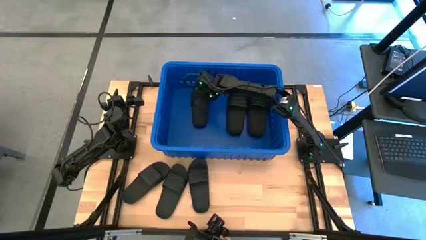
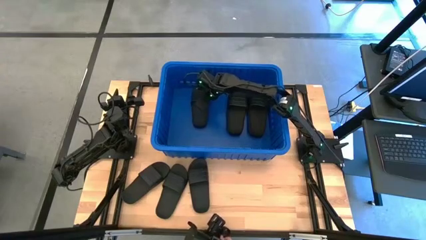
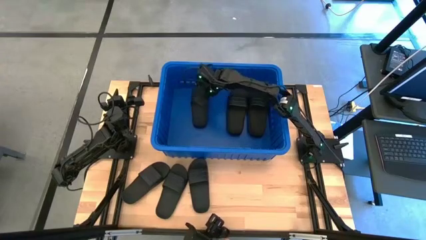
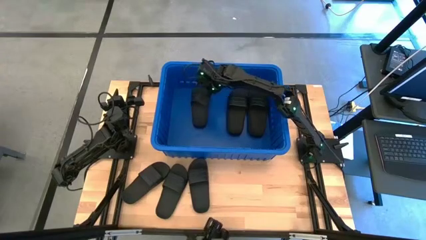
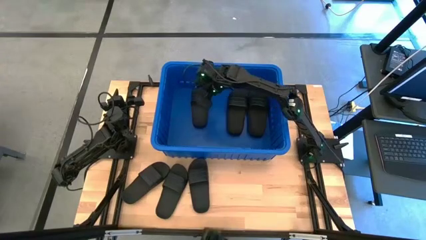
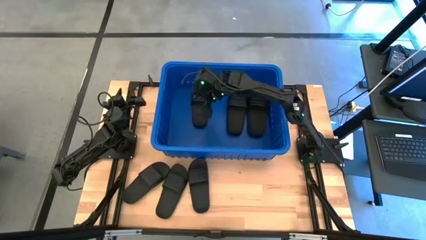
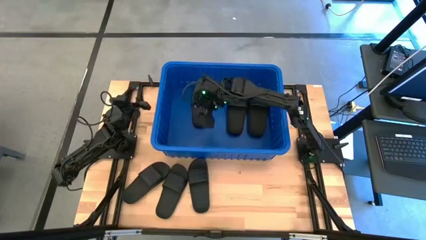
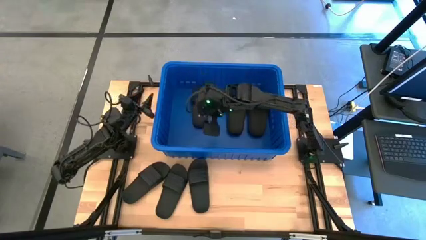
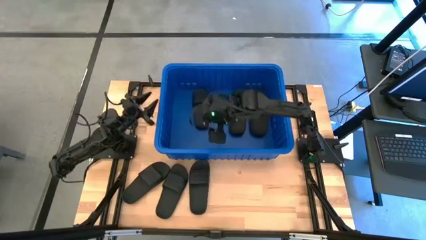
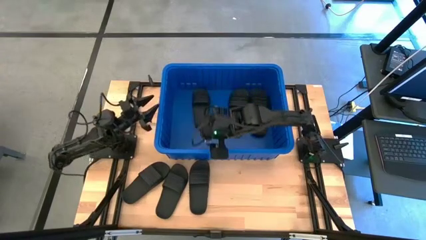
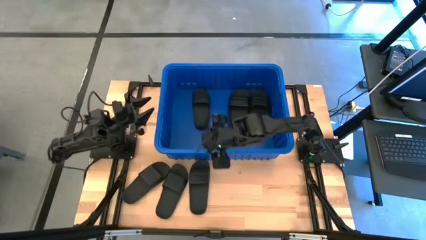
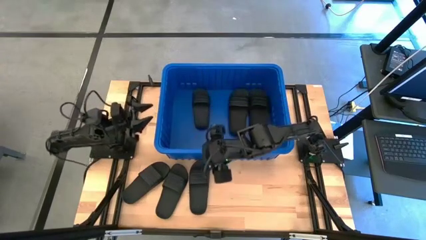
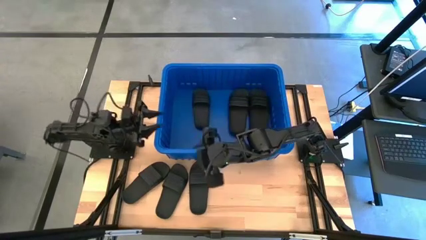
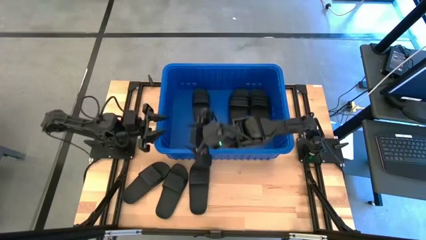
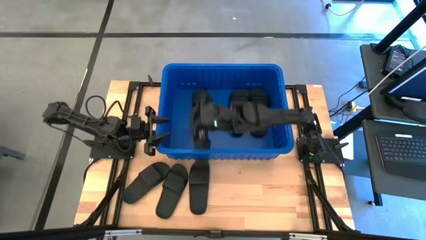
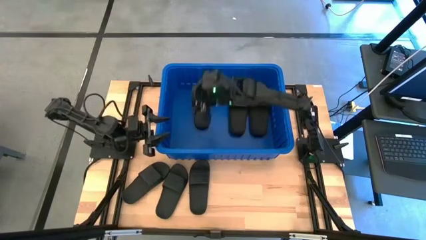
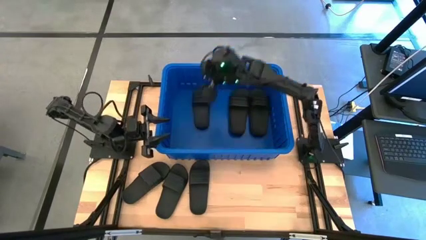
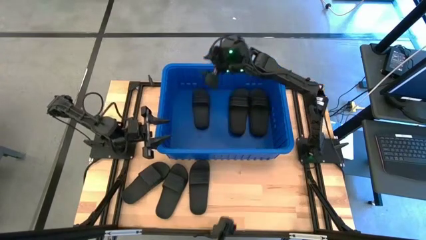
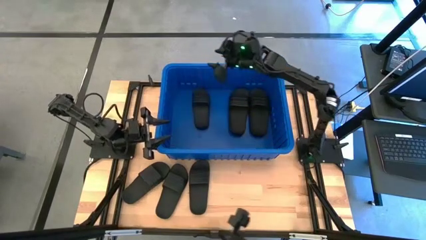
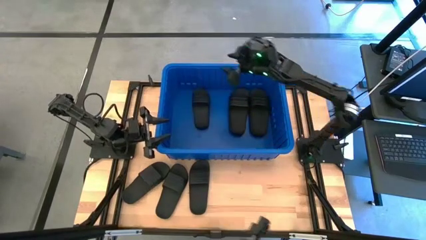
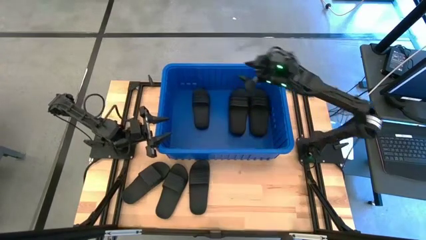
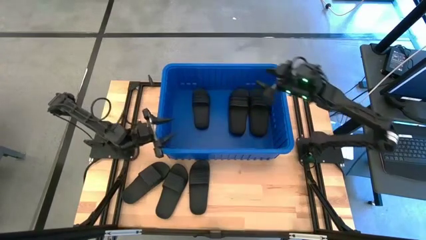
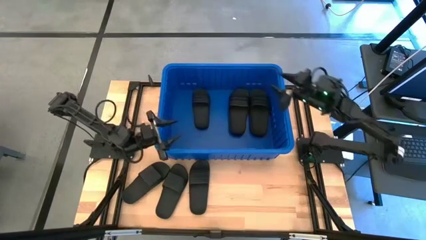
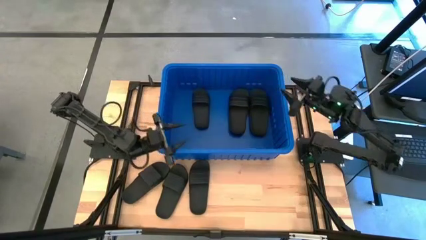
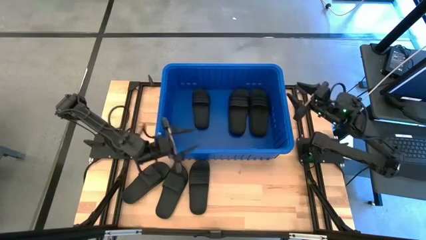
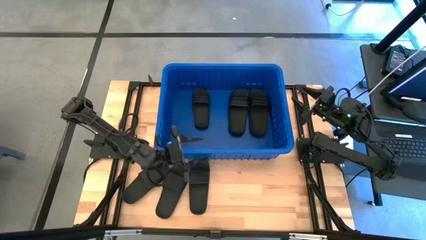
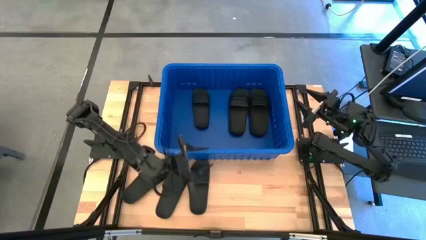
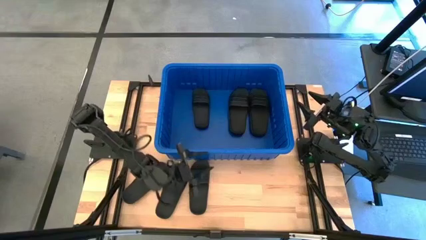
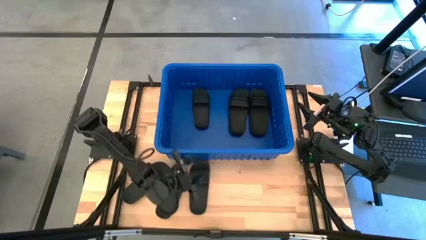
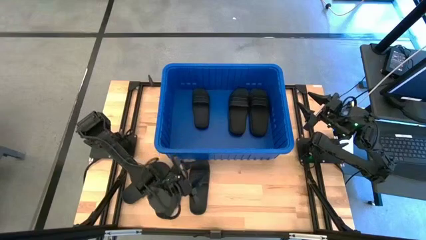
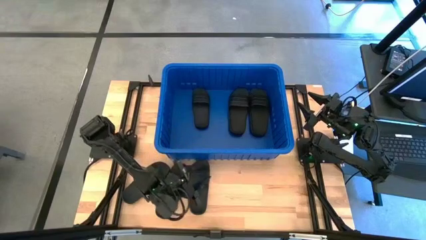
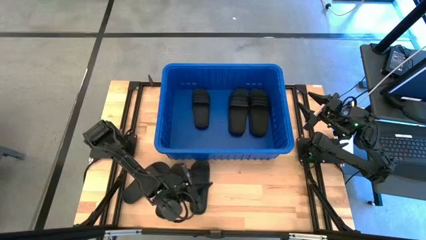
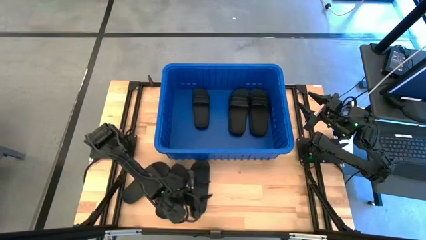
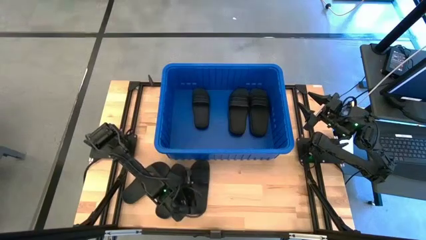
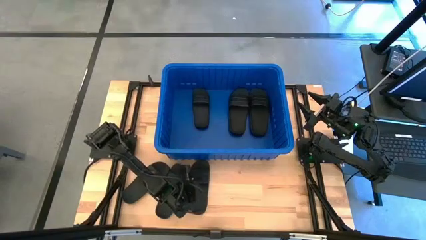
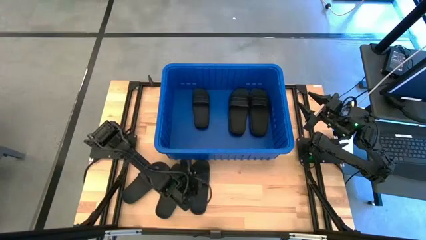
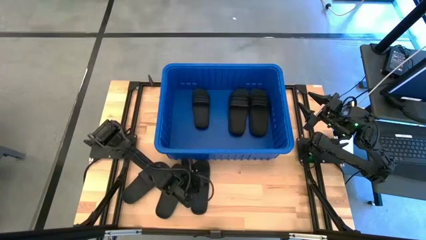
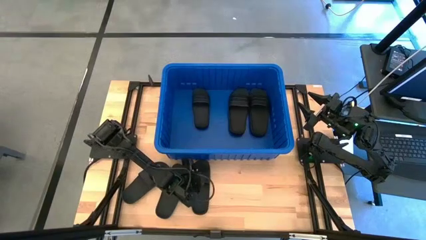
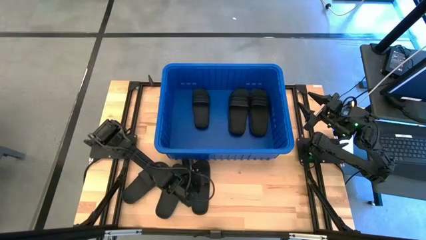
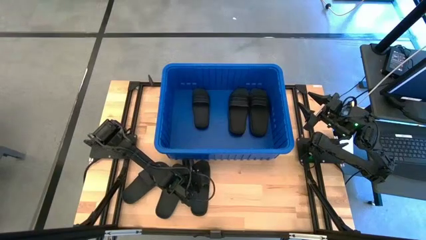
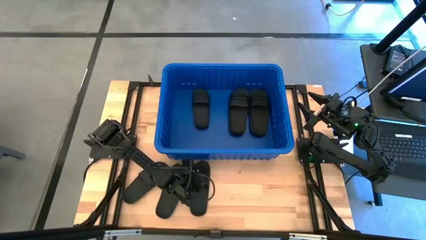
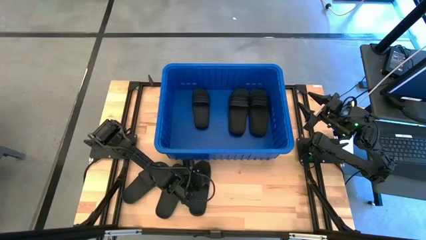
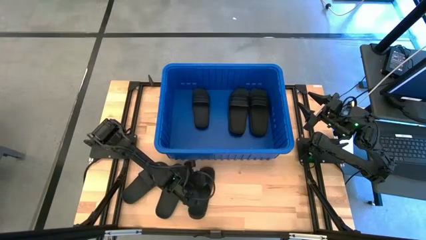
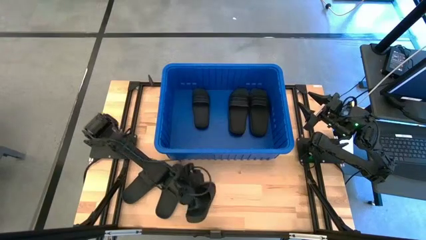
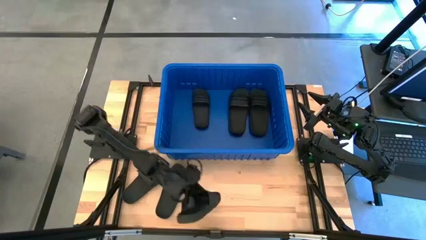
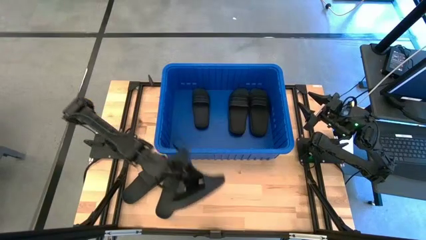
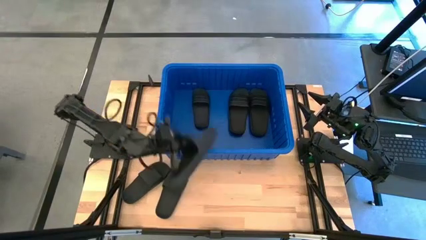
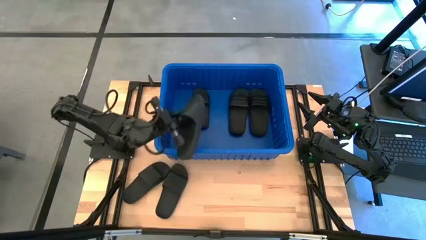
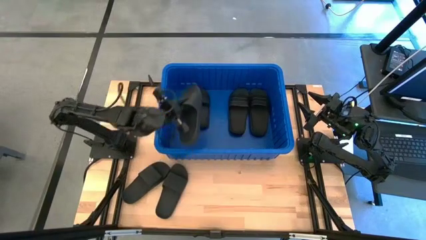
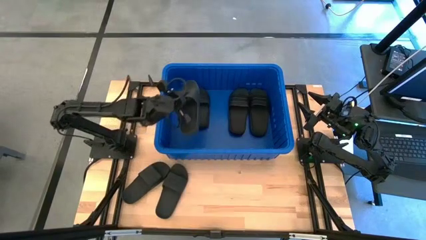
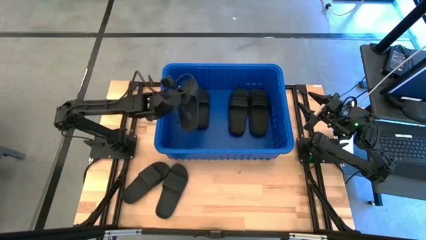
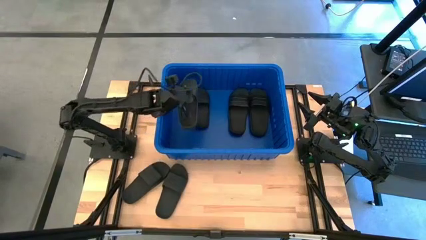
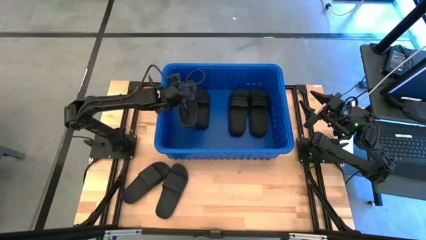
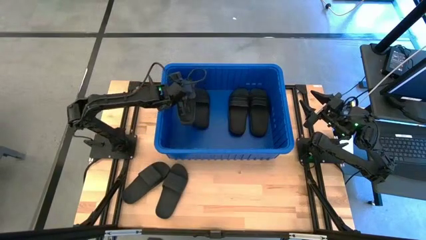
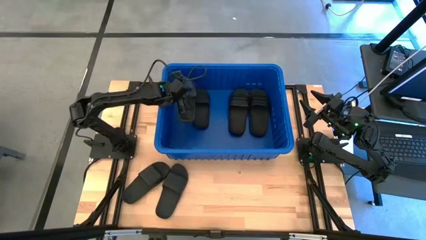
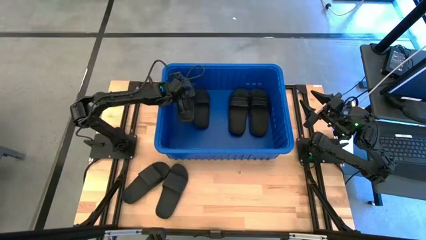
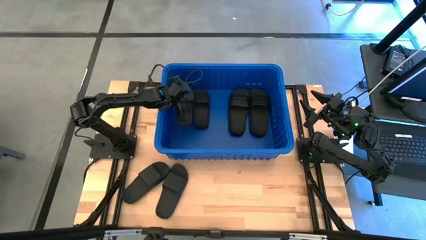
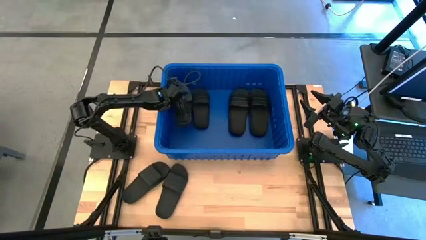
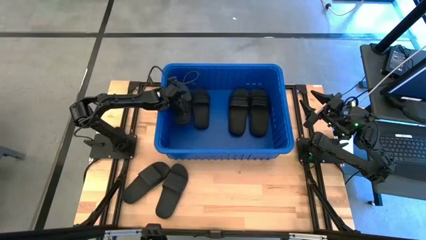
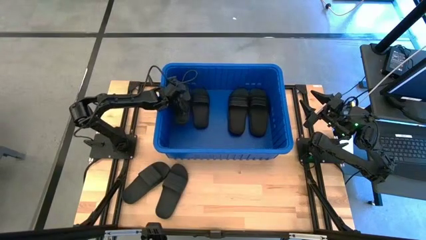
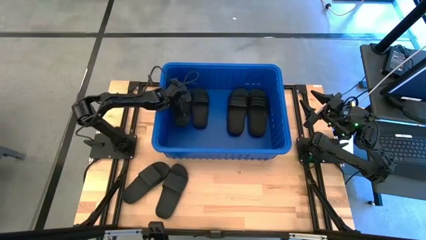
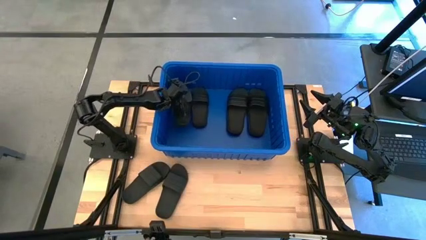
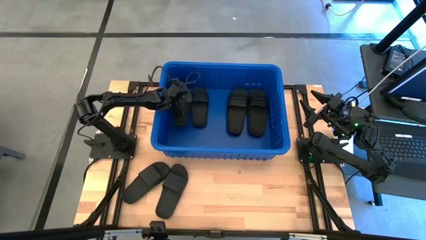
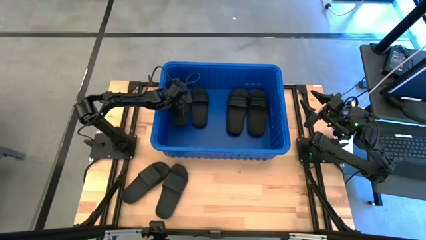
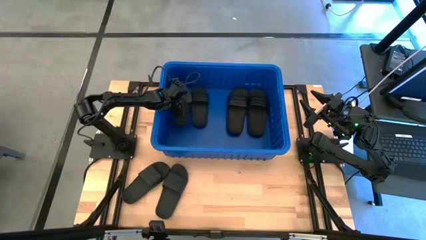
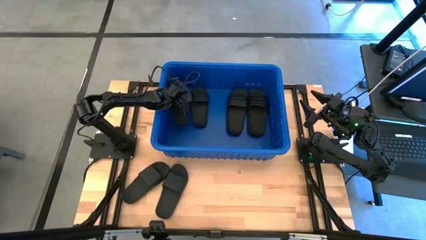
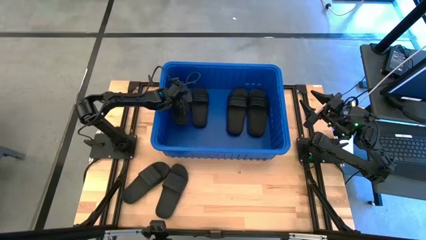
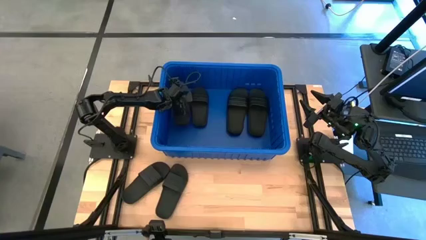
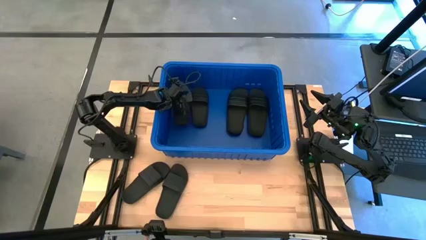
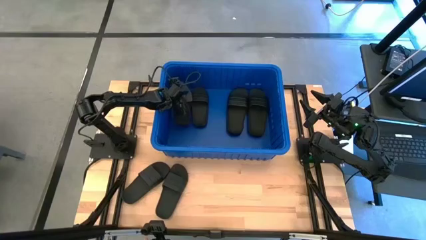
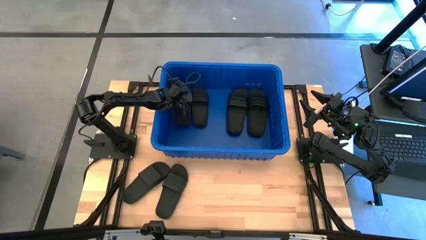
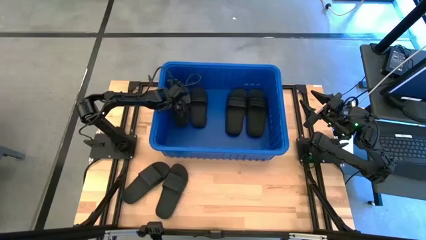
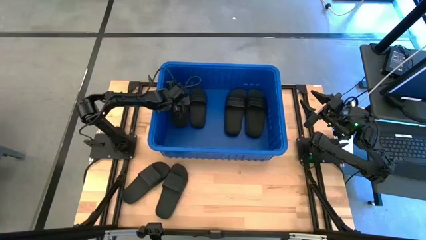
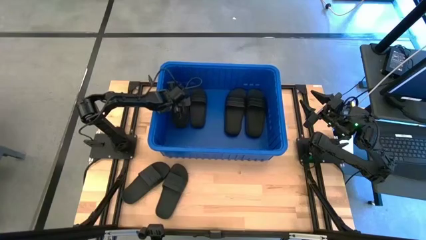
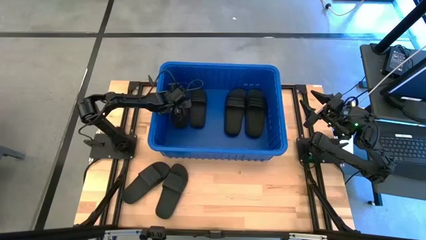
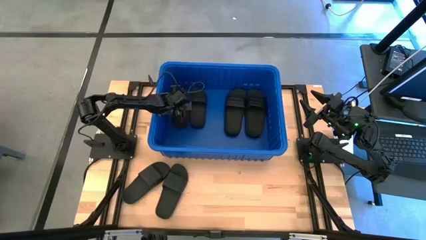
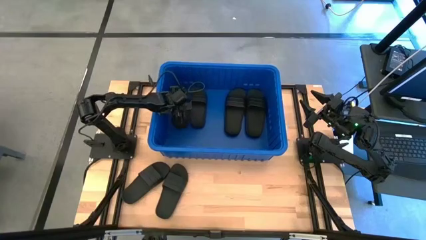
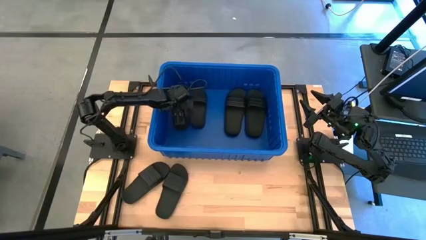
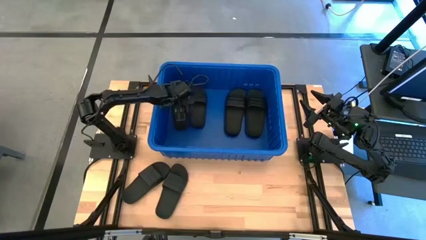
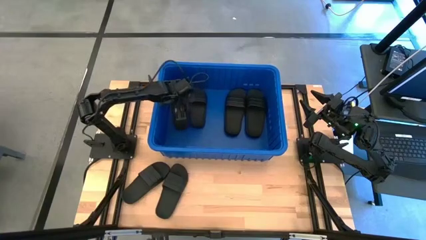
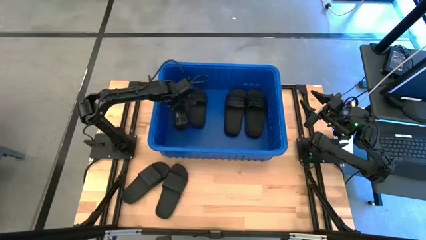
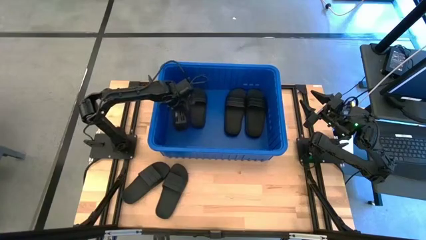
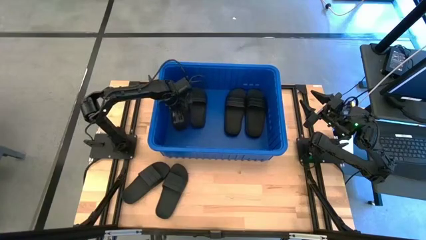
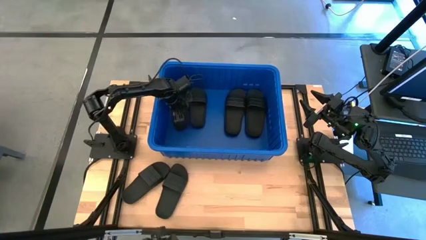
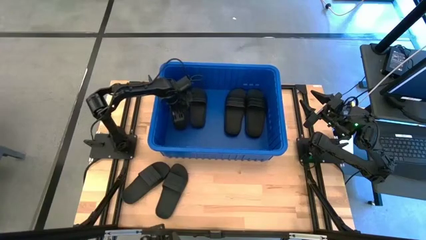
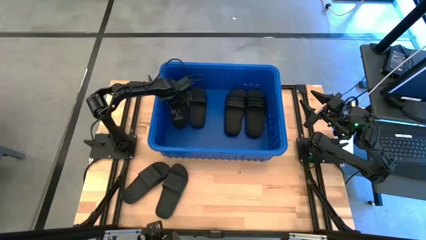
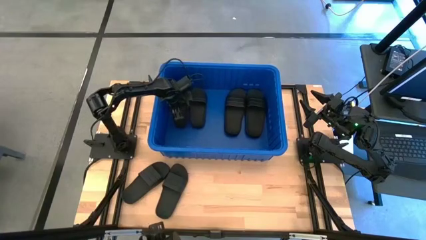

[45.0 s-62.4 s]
Task: Pick and place slides into bin
Put the black slide into the blue bin
